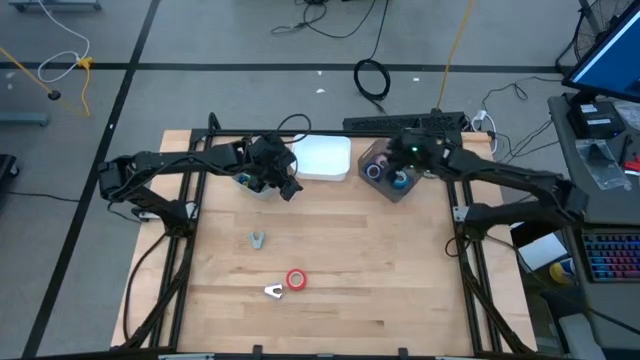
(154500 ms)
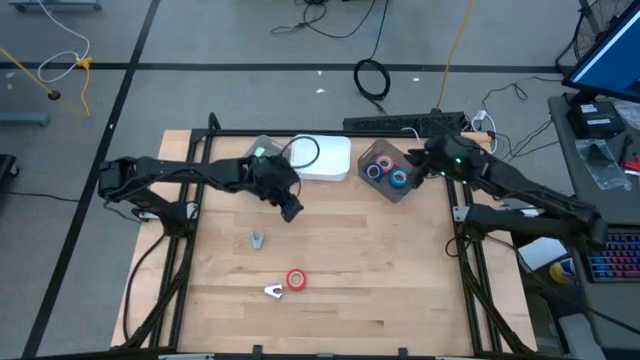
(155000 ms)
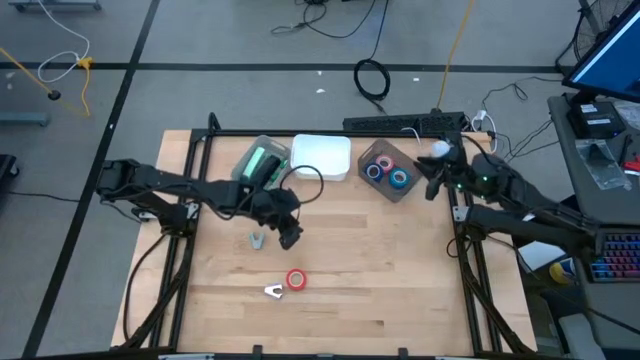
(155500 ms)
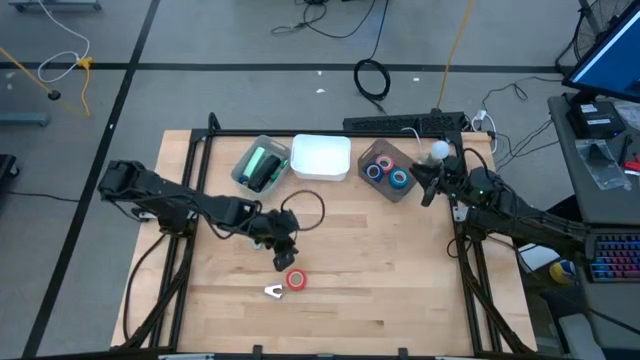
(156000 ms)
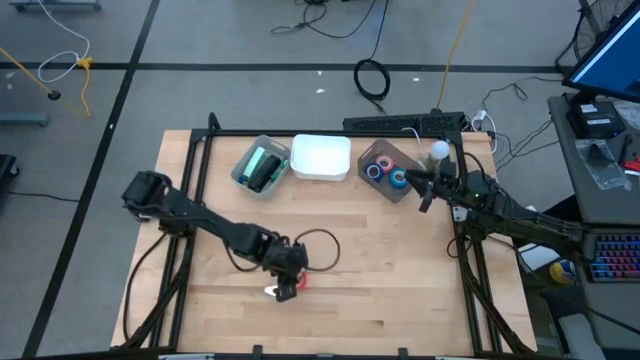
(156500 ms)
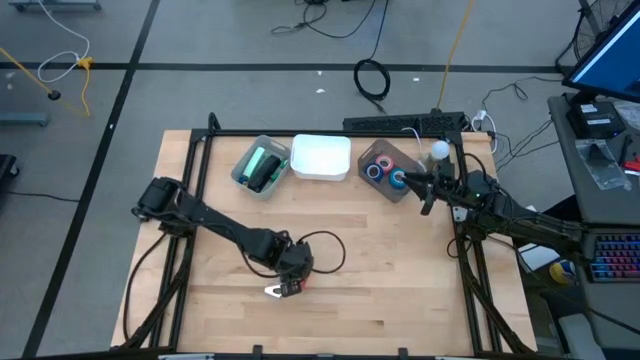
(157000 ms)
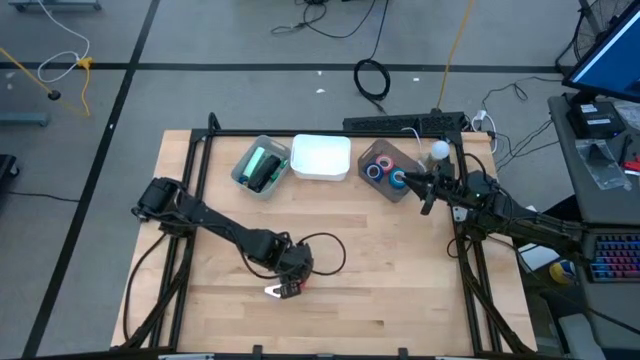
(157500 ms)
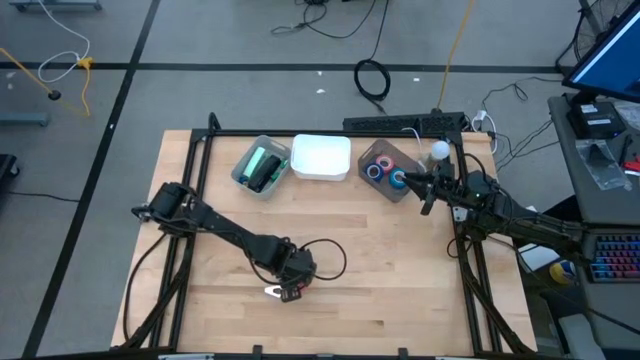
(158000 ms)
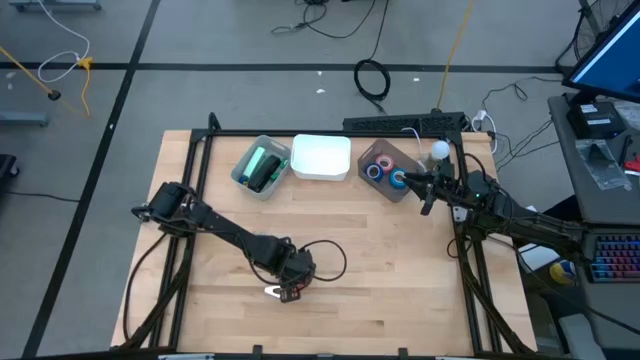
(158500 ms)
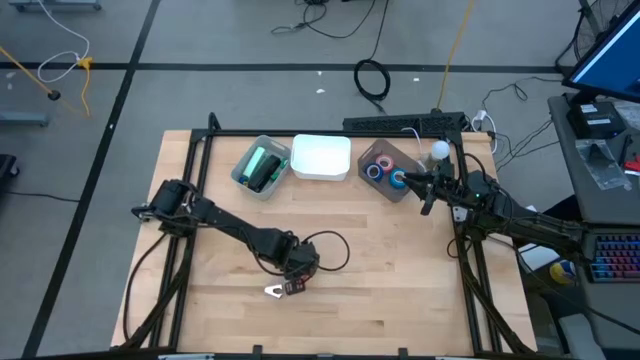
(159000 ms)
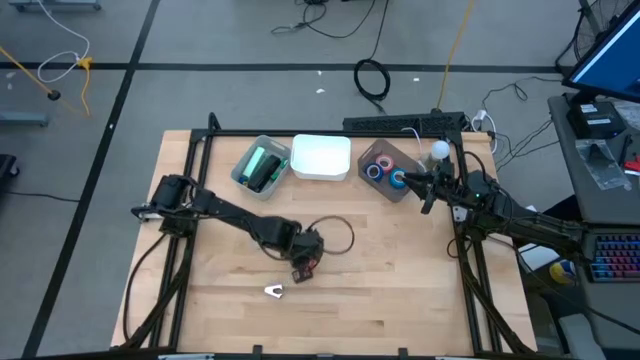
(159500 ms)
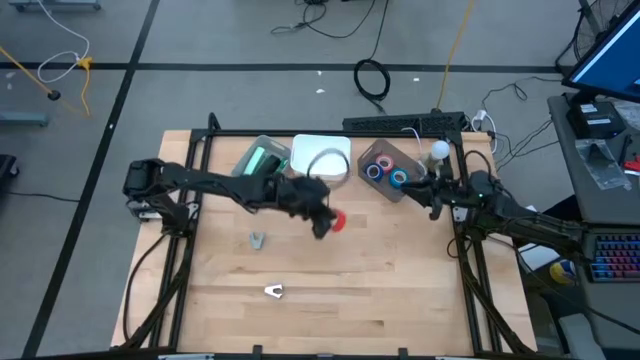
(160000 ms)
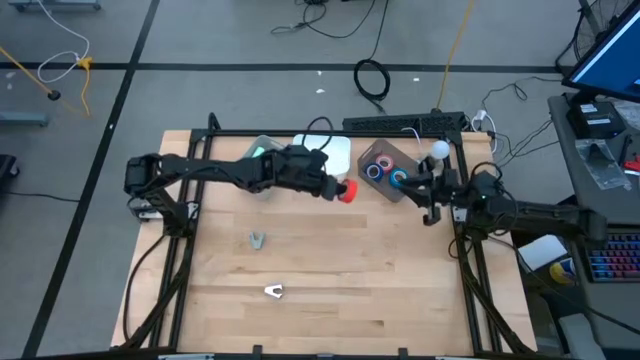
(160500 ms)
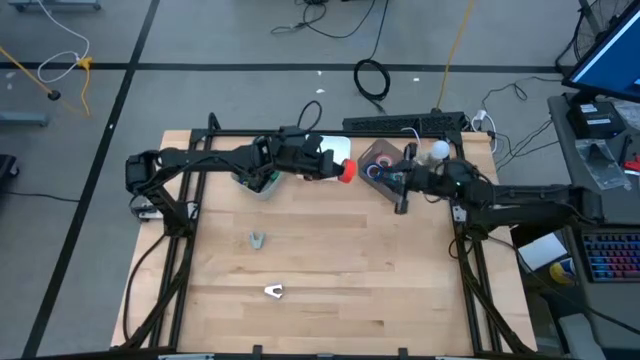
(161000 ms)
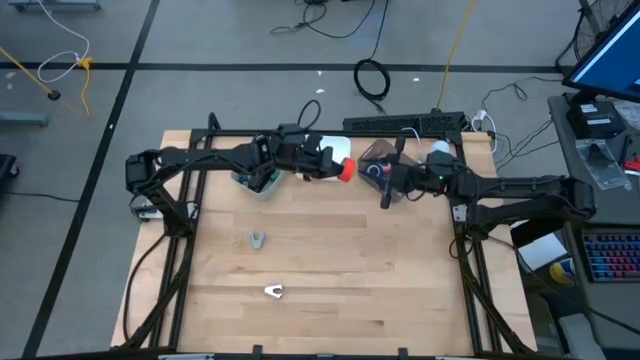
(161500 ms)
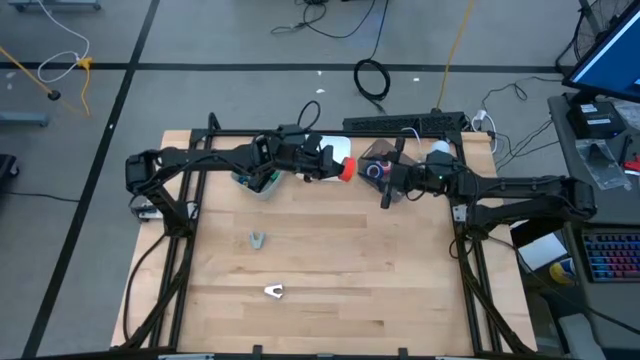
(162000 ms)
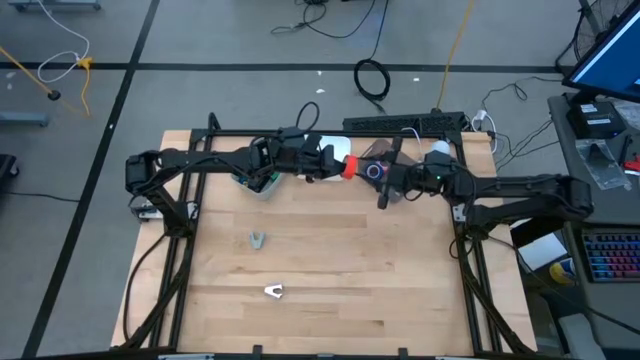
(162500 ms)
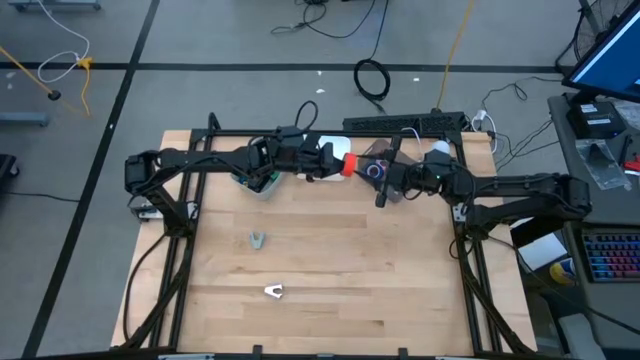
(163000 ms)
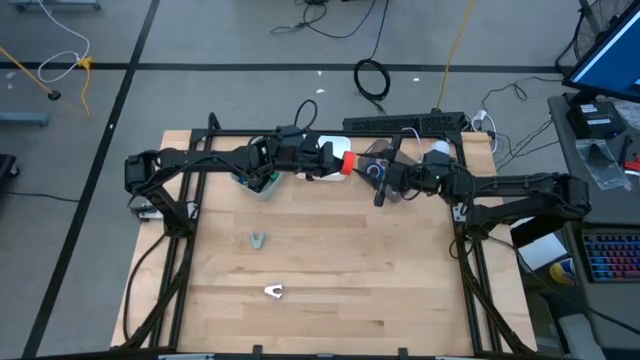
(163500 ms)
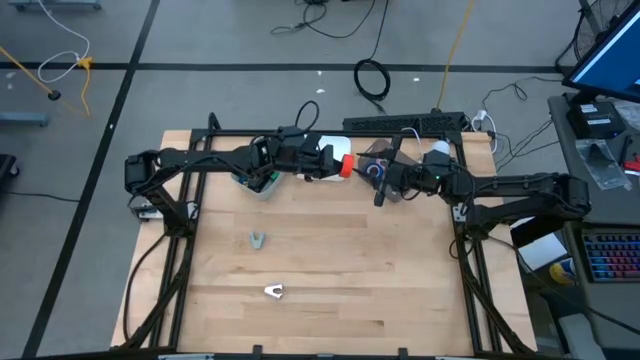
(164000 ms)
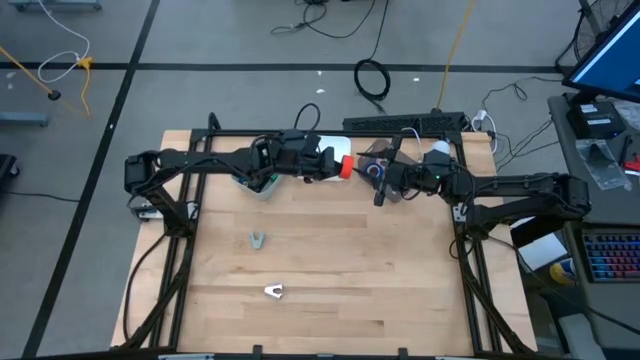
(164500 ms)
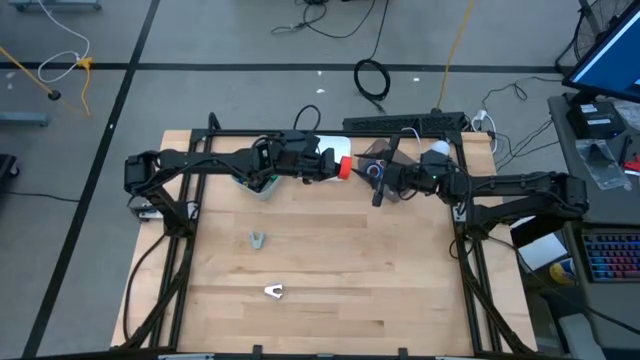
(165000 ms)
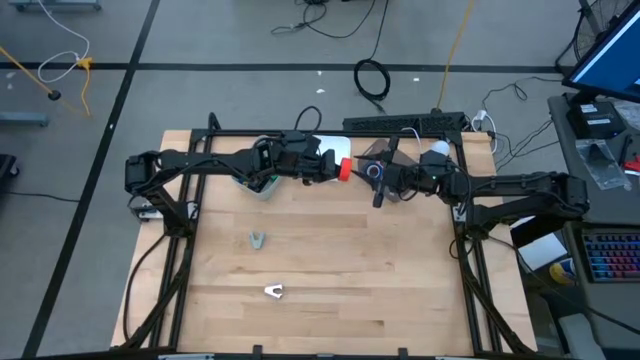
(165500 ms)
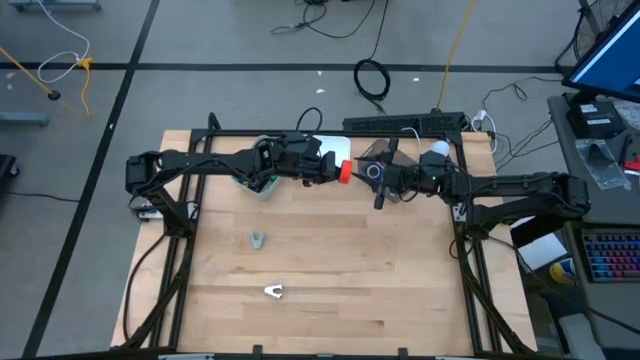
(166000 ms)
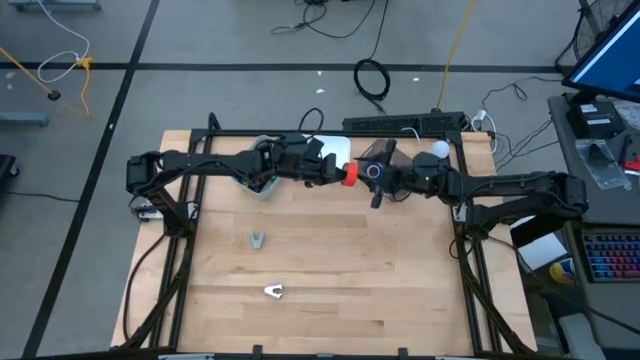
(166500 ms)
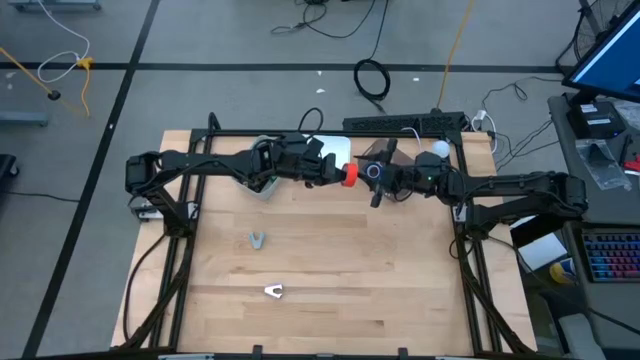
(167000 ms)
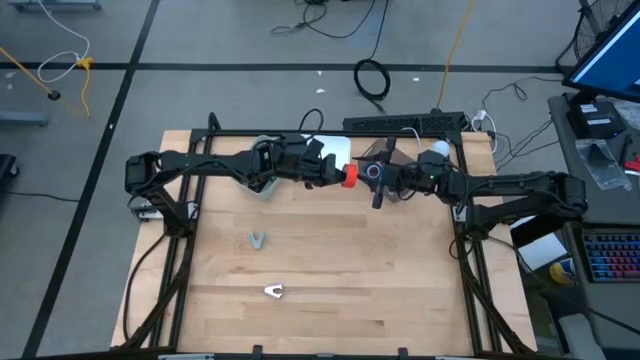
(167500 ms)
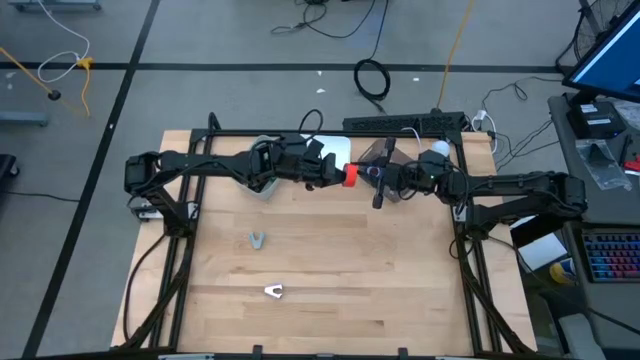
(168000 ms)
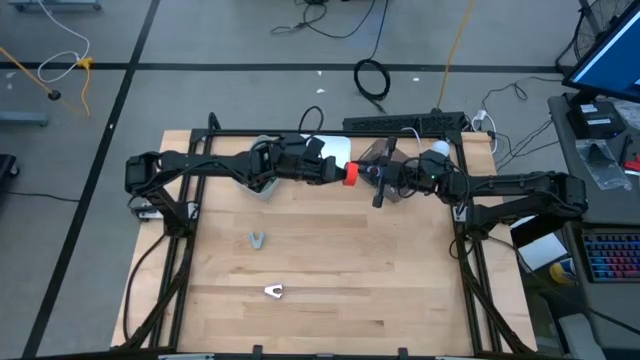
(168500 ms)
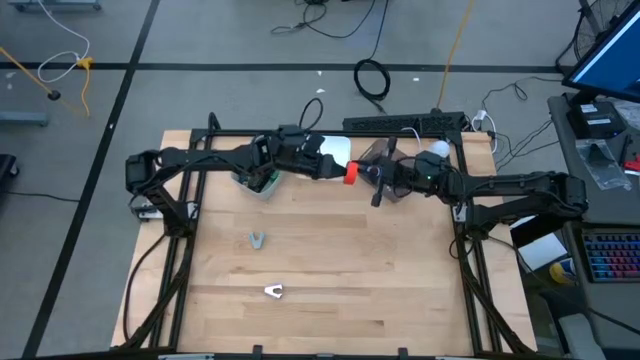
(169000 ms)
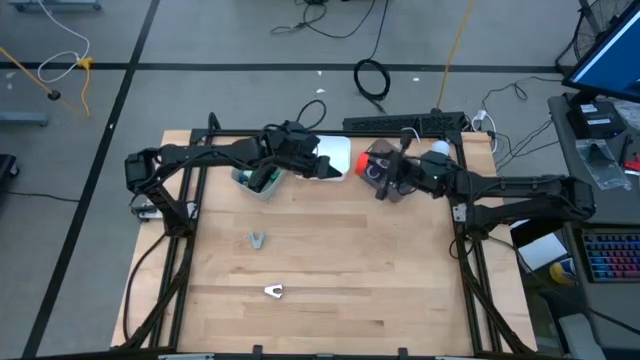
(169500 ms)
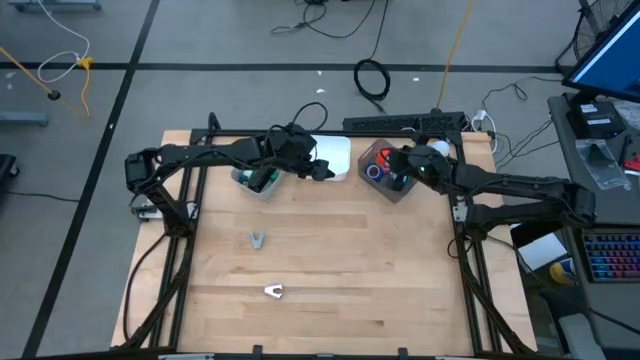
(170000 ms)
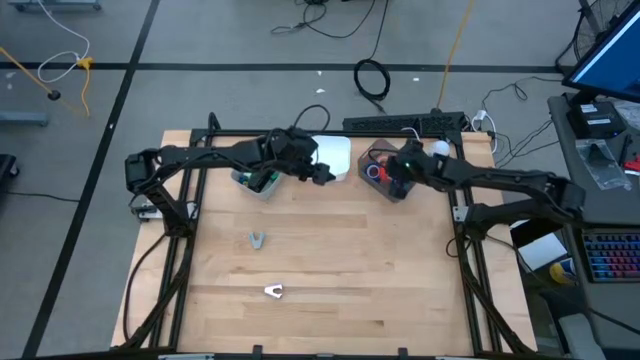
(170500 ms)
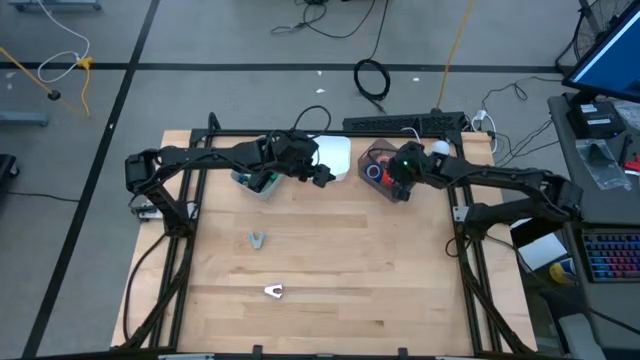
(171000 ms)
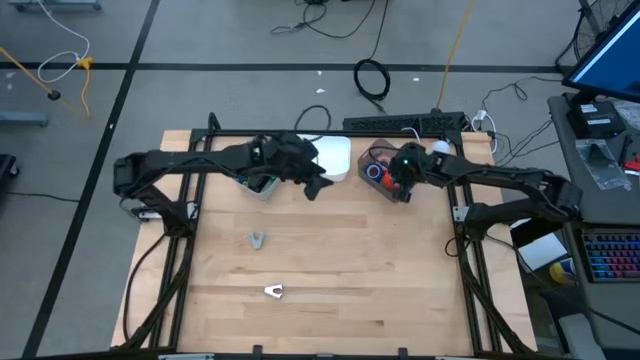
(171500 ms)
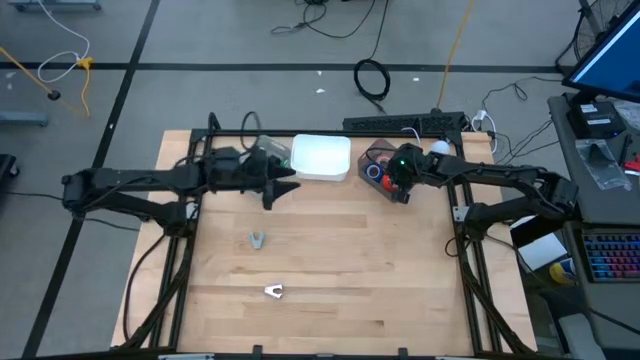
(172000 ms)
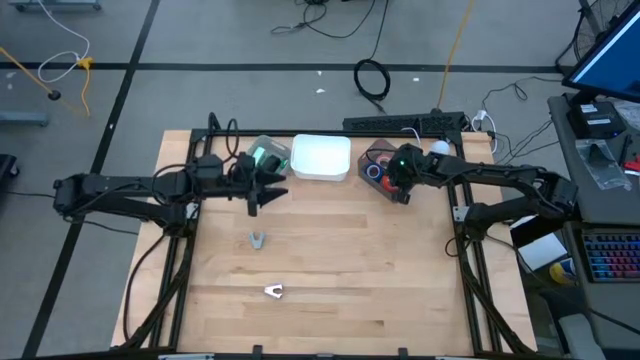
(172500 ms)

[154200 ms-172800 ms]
Task: Pick and place Stapler, Stapler remover, tape
Put the red tape into the black bin

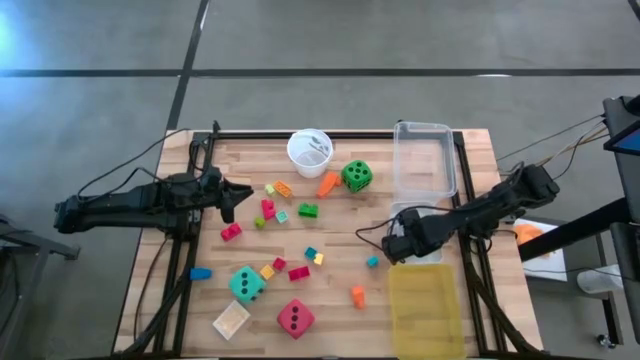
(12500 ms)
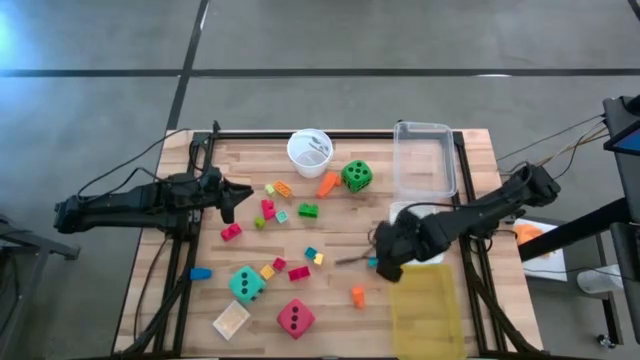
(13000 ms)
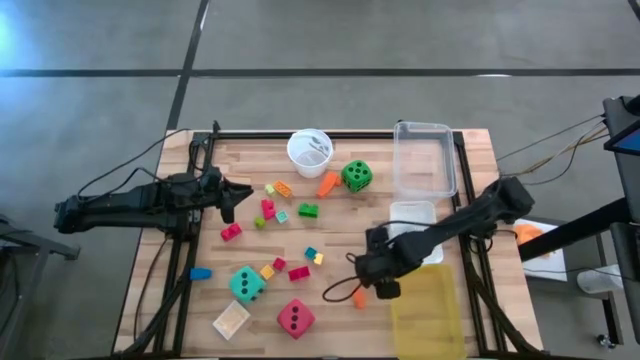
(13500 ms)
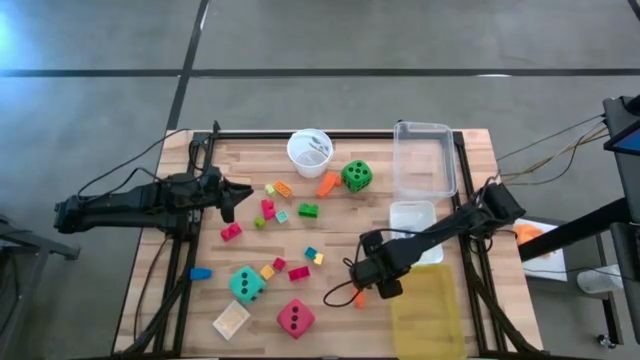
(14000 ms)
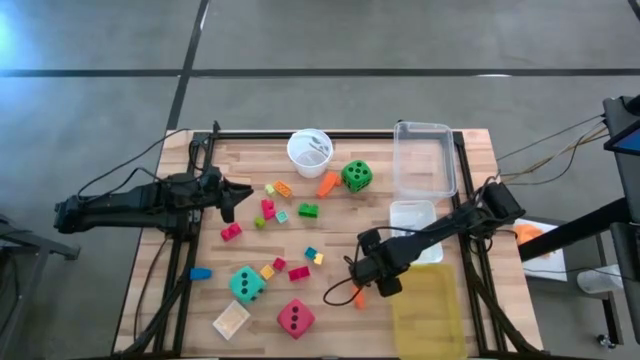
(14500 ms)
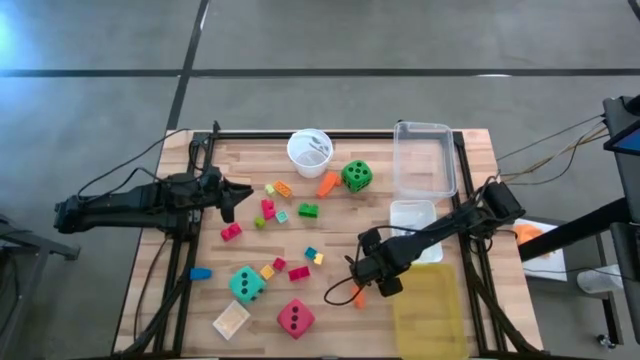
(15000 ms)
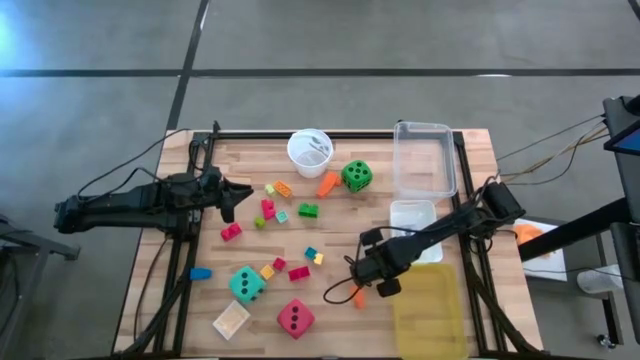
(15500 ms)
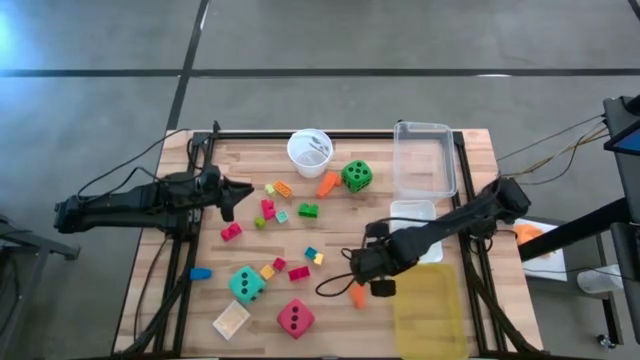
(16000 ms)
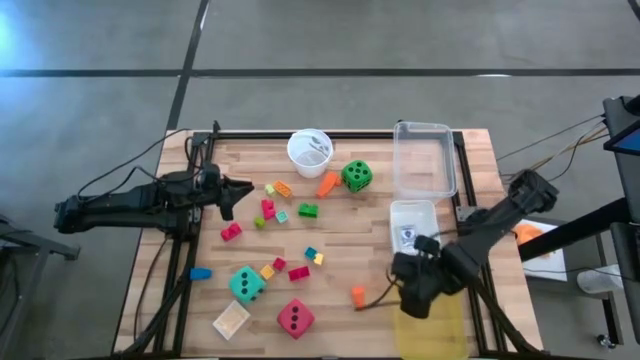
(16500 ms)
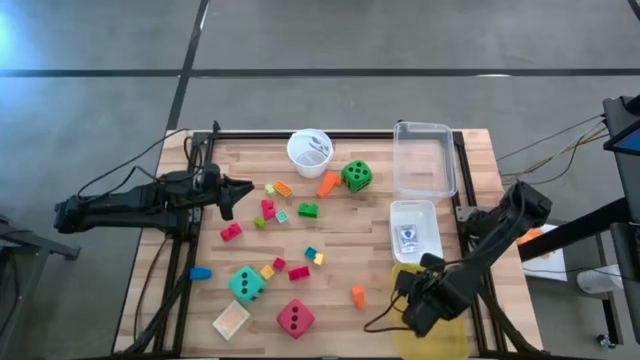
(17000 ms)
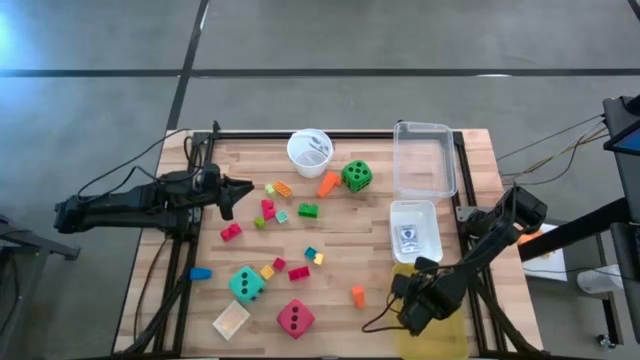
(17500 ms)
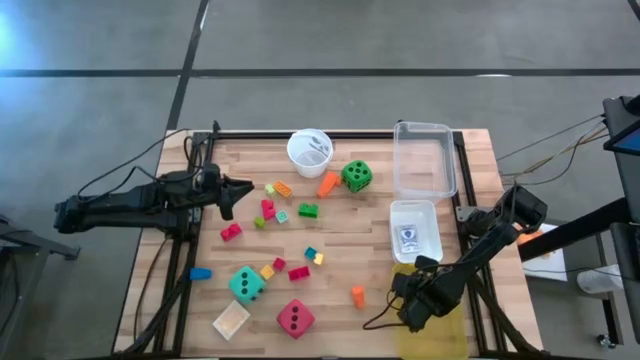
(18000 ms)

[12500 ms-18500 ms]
Task: Pick & Place Toys
Put the blue game piece into the yellow bin
